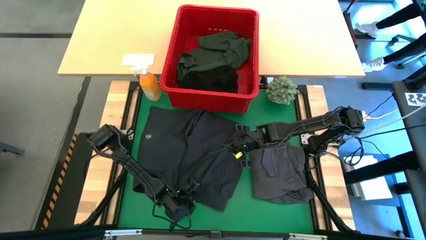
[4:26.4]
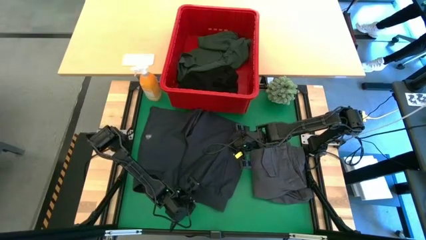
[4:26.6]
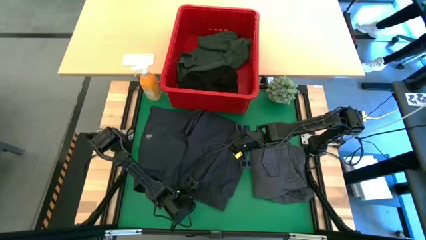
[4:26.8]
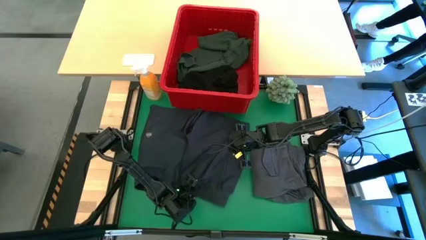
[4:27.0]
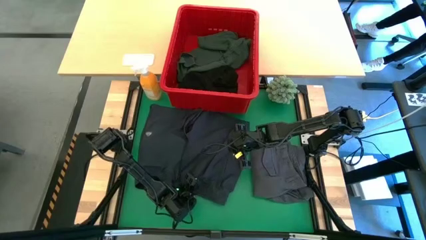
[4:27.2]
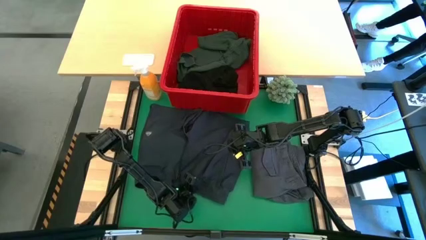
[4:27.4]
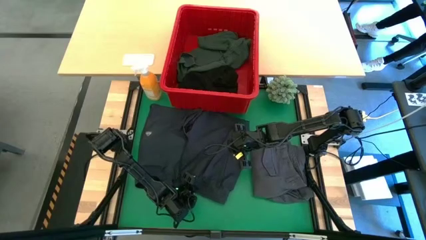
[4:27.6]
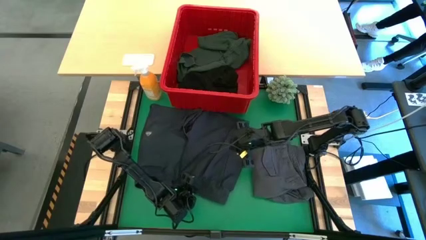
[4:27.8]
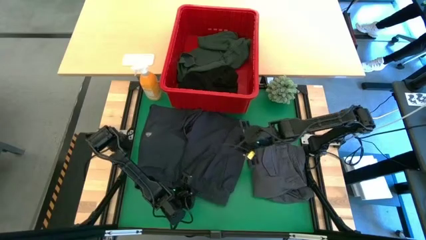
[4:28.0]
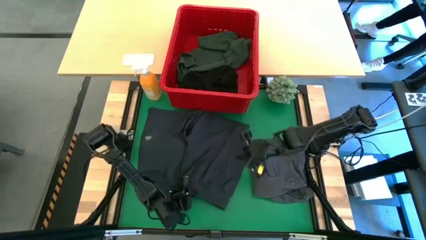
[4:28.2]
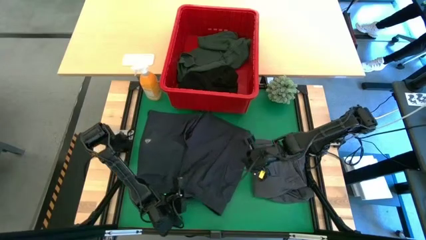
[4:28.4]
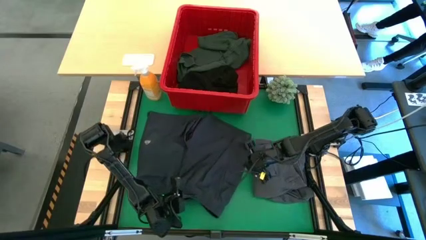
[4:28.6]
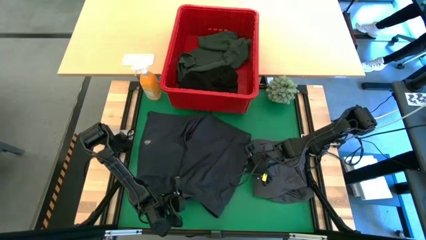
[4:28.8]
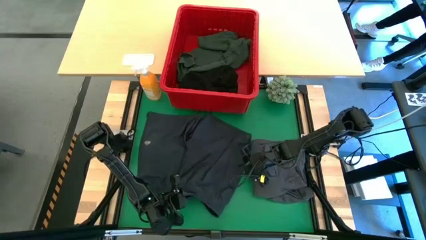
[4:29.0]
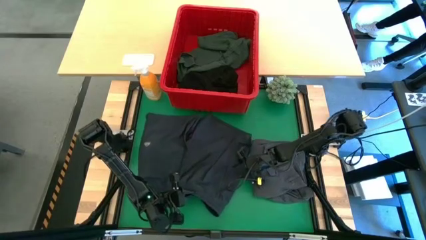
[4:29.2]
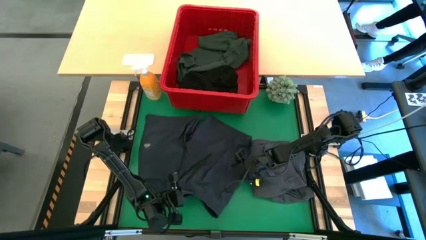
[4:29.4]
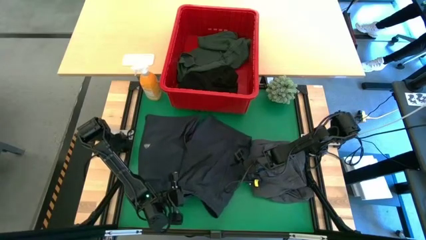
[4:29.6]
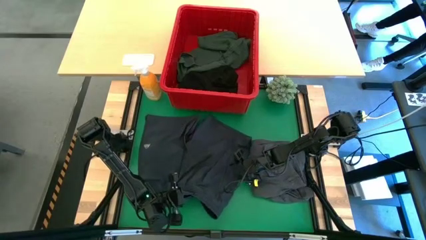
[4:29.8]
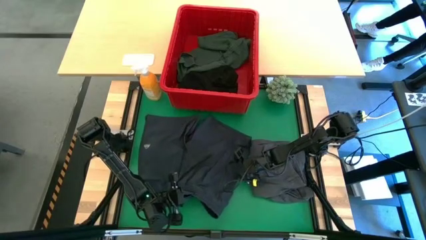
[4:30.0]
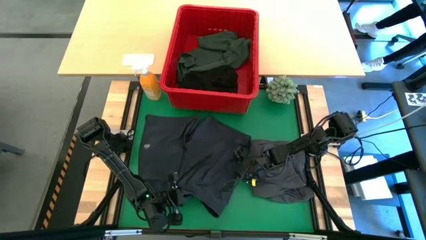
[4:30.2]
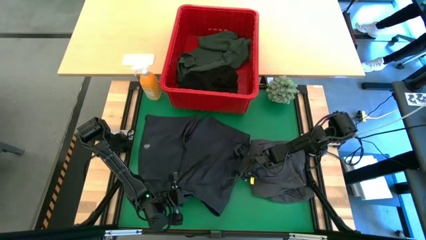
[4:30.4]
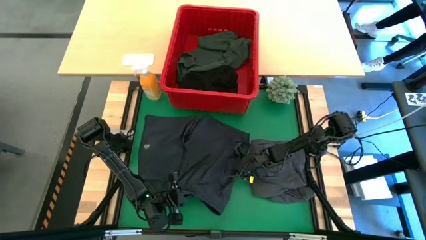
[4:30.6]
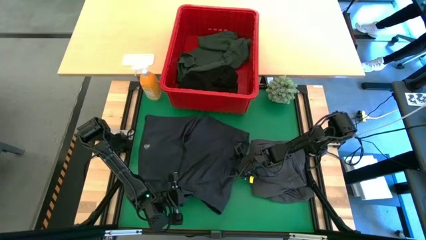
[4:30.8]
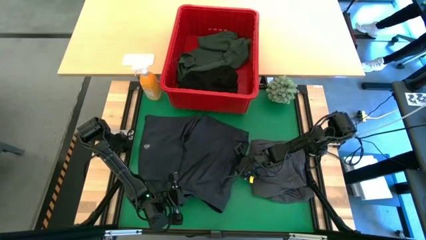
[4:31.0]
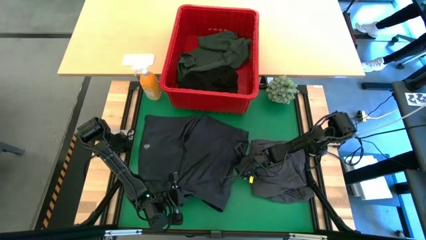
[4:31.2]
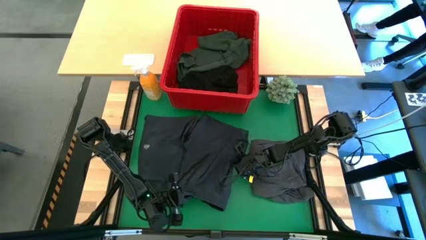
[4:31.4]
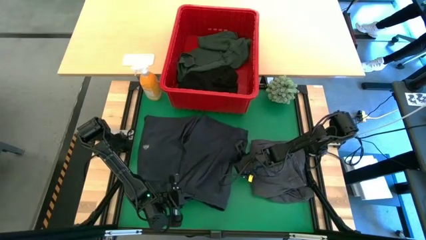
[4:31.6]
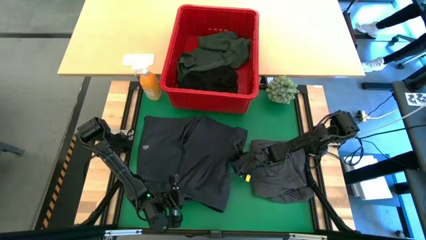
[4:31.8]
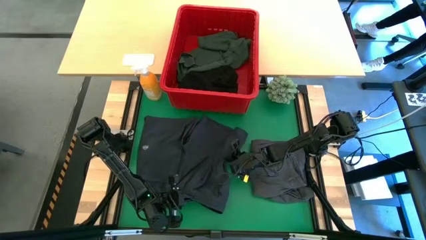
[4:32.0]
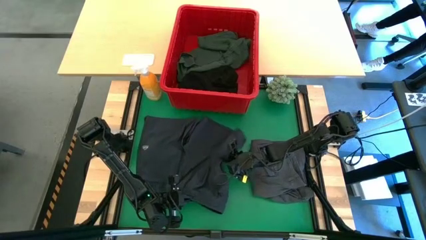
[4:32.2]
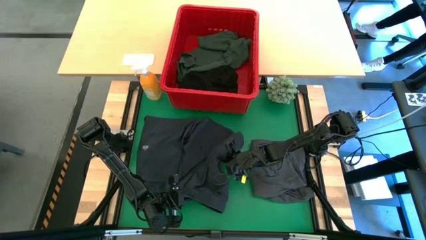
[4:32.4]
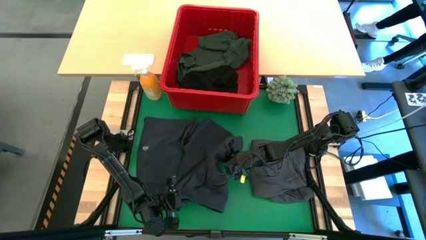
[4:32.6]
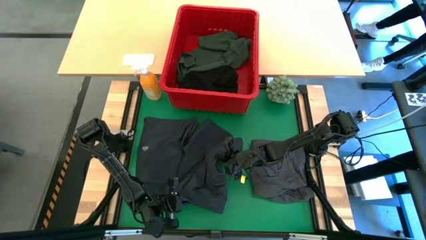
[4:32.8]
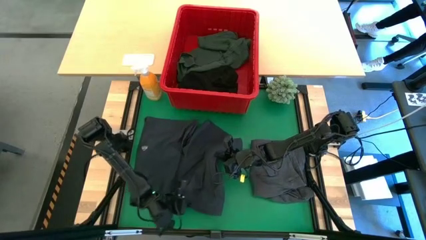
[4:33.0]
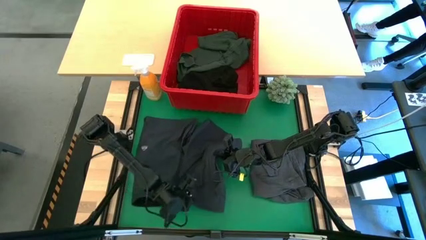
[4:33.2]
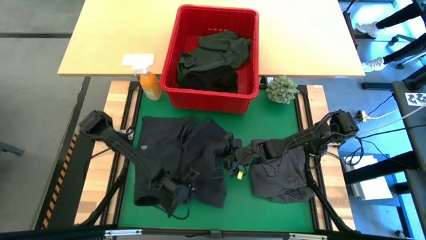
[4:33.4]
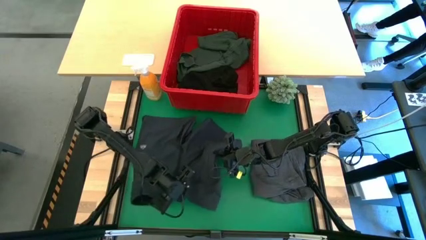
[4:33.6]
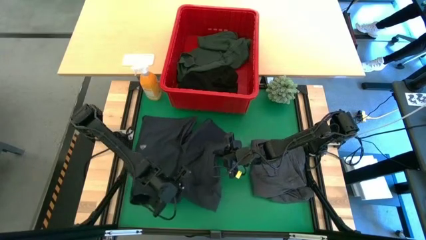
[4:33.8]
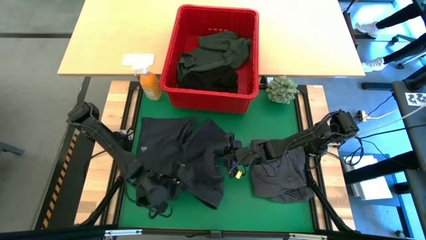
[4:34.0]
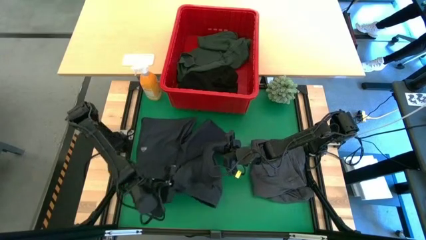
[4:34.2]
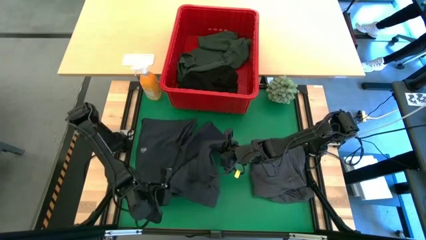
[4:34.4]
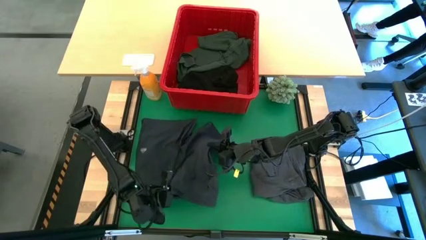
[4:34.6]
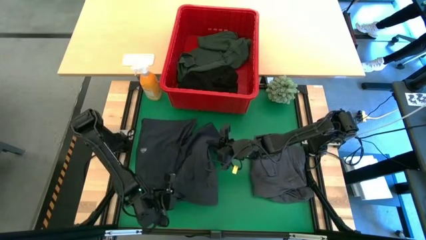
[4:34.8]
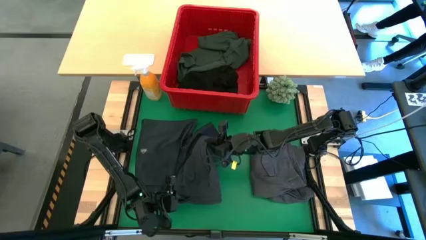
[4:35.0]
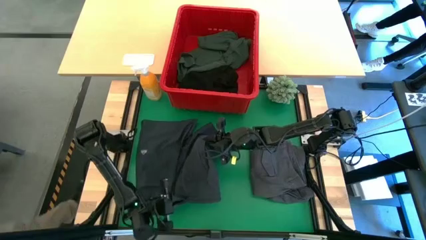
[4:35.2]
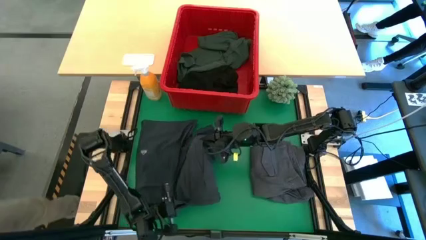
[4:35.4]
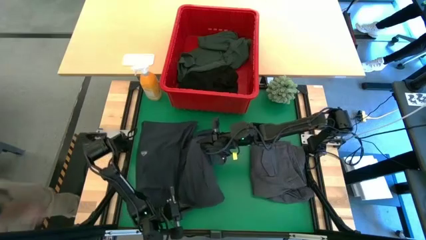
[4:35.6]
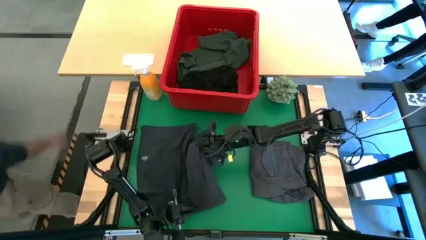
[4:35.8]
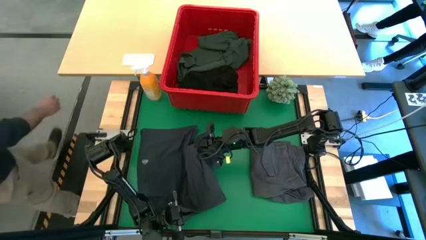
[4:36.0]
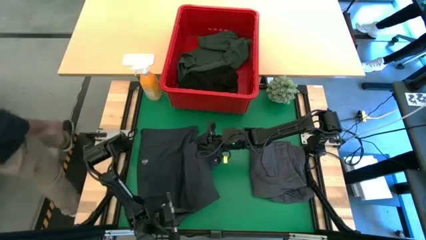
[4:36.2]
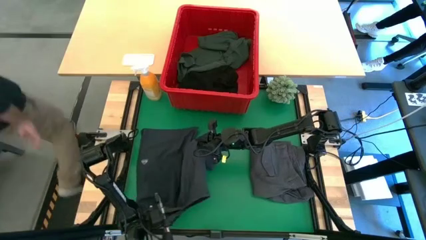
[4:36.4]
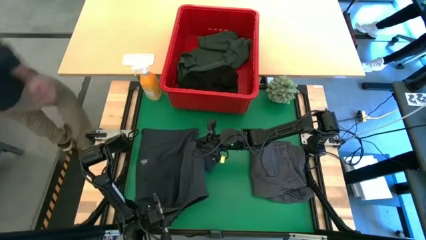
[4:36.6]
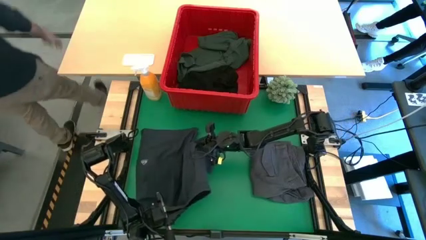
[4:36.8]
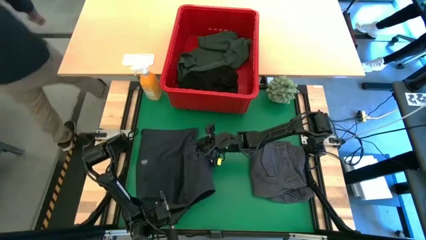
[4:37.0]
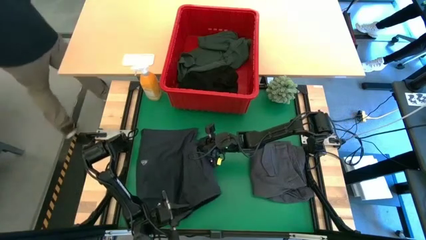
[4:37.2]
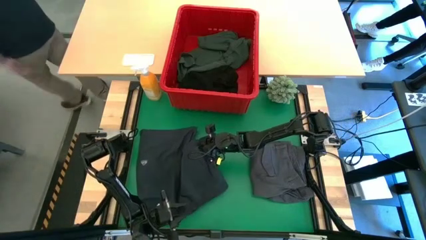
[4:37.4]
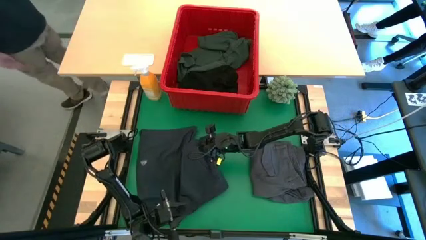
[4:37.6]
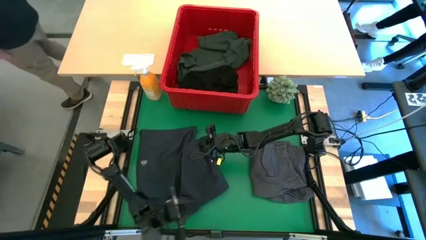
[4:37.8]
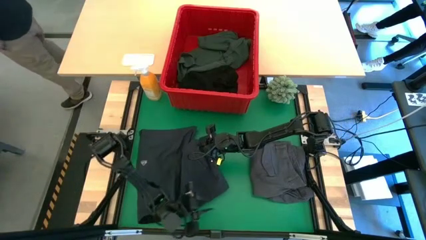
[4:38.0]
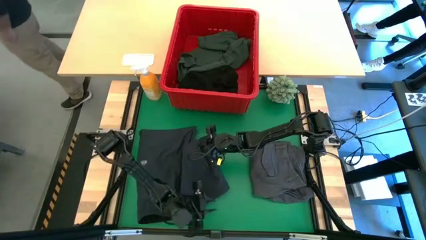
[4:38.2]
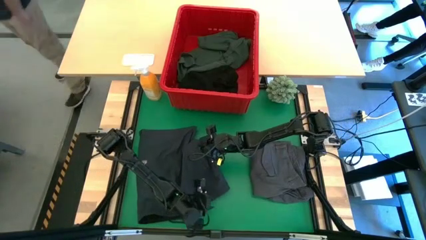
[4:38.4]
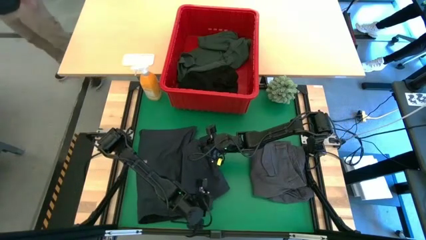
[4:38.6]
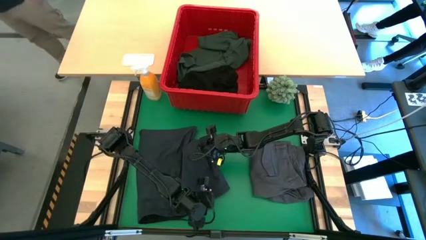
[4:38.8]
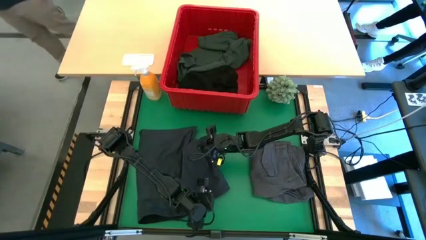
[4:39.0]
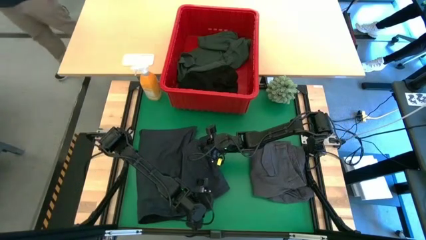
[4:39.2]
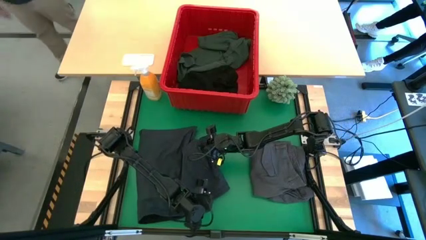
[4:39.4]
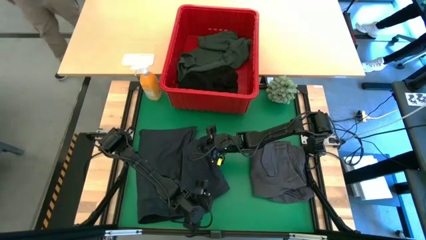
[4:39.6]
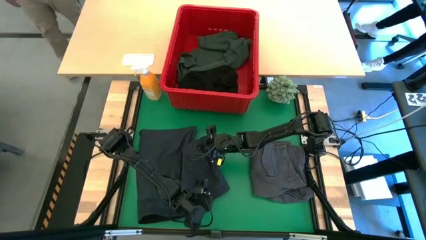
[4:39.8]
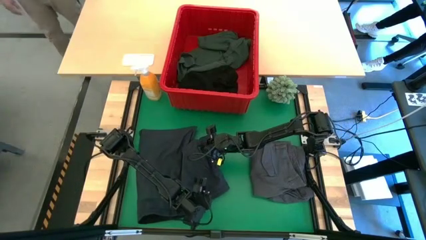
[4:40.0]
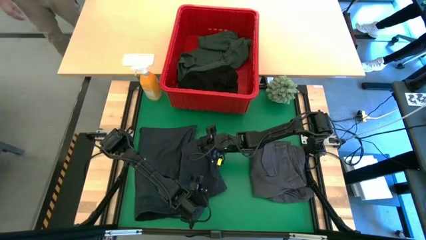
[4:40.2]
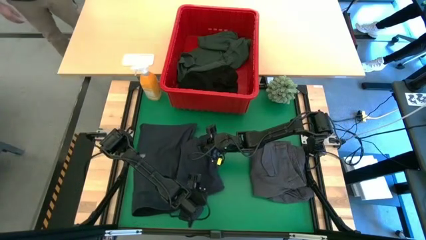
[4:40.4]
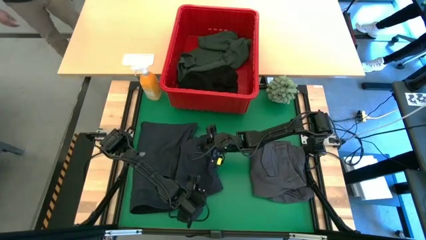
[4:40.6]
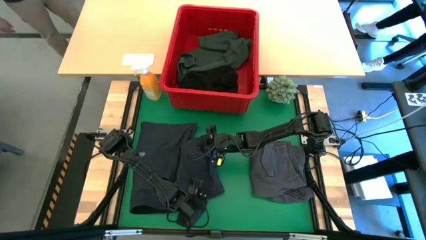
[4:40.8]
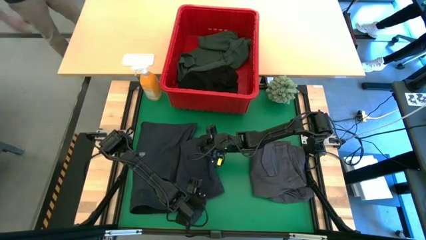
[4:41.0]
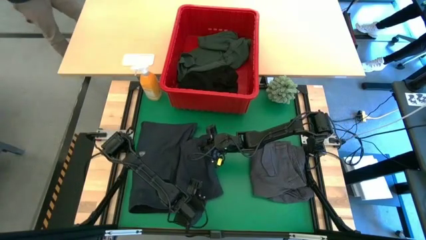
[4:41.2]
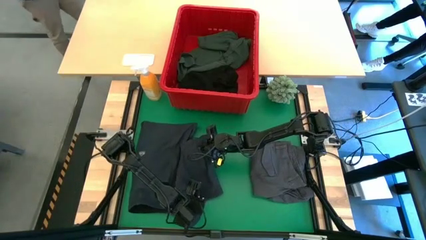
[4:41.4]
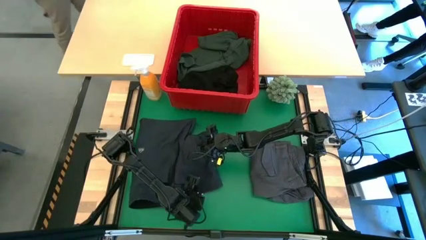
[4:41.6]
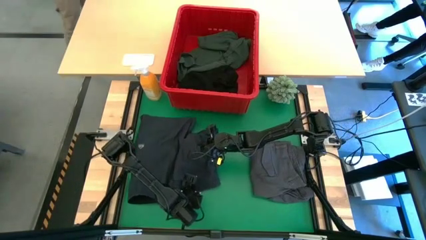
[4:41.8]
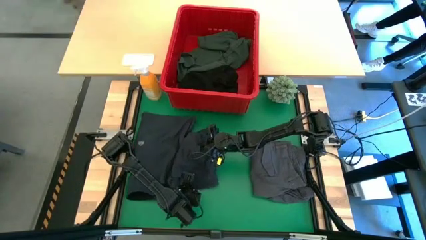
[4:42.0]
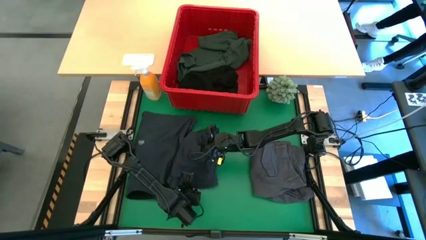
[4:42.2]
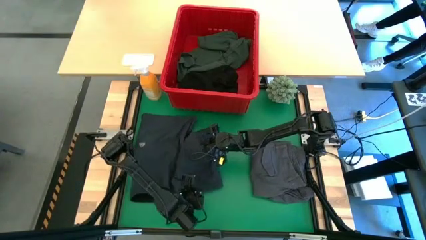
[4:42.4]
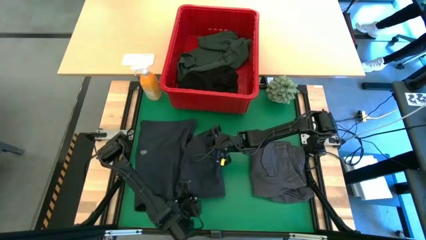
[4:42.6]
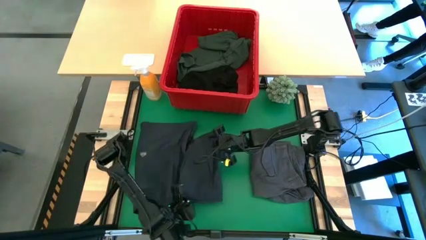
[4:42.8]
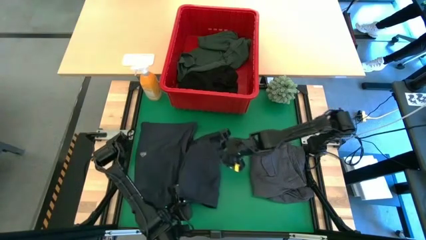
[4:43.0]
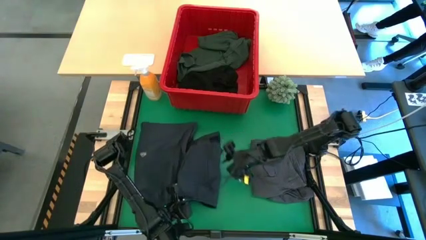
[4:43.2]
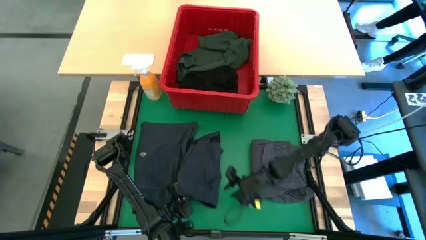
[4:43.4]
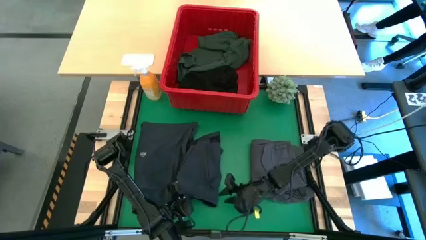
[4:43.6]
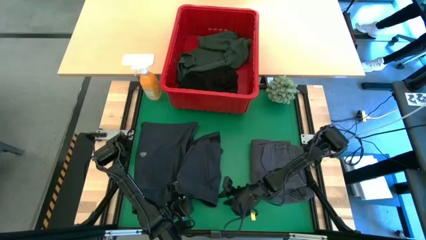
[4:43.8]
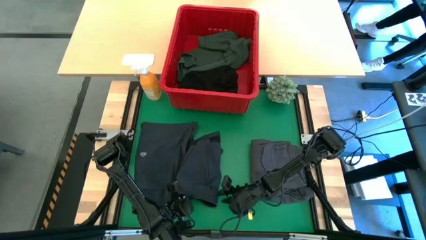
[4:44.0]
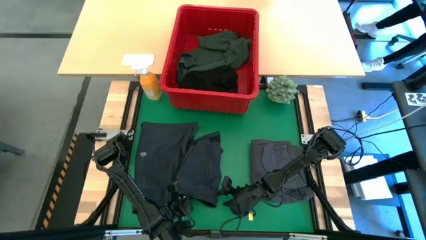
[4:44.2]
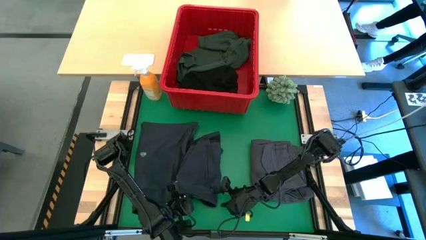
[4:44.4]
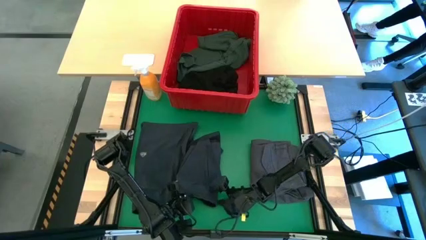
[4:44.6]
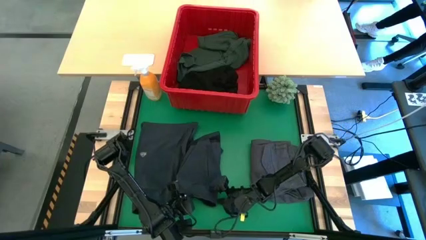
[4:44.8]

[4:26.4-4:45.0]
Task: Fold Laundry from Bin
Fold the dark gray short
